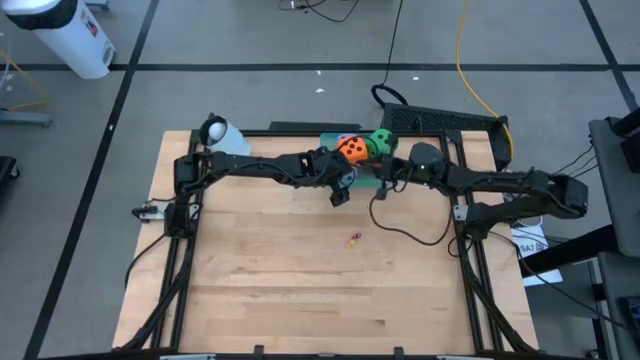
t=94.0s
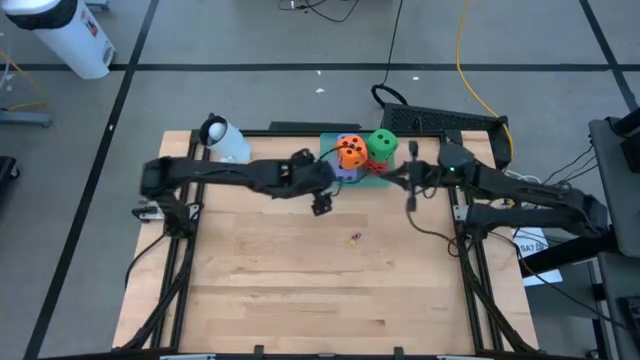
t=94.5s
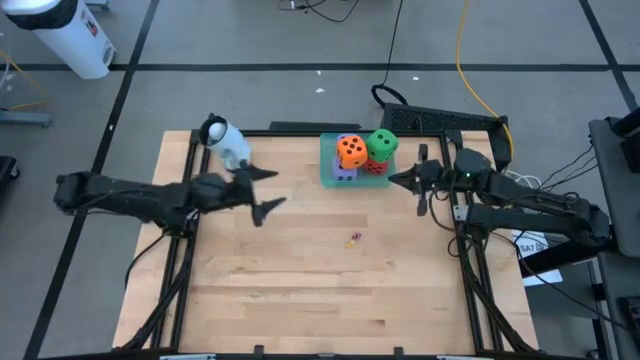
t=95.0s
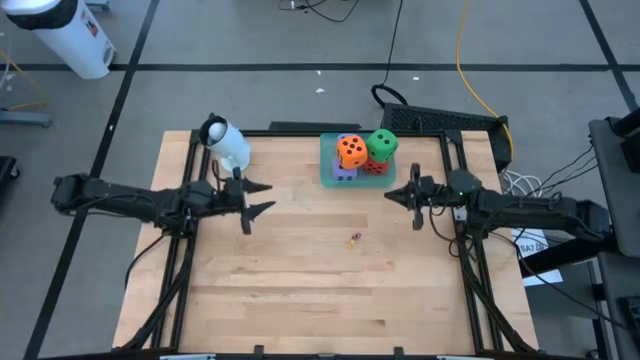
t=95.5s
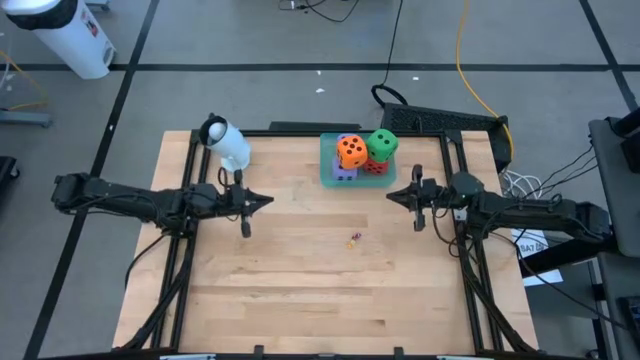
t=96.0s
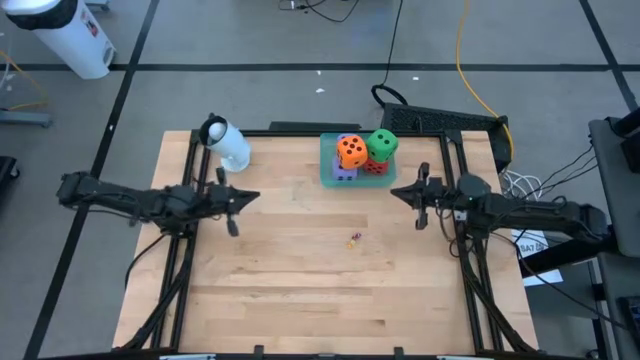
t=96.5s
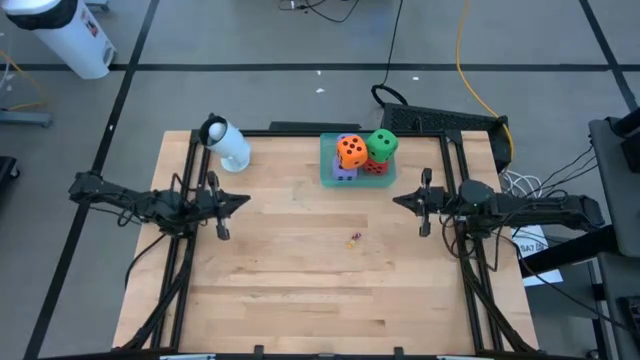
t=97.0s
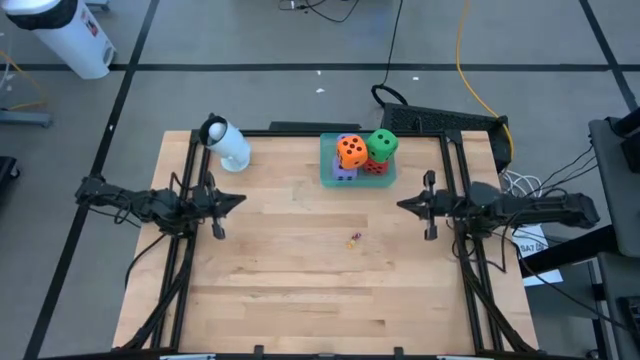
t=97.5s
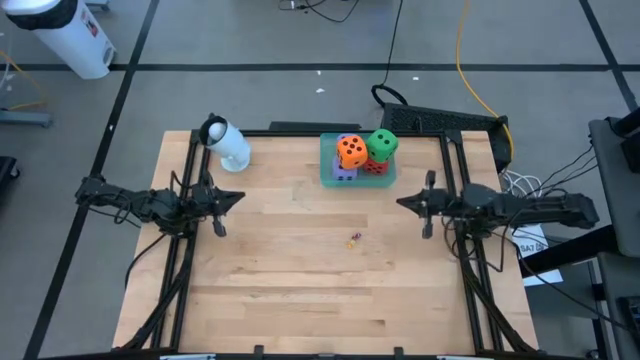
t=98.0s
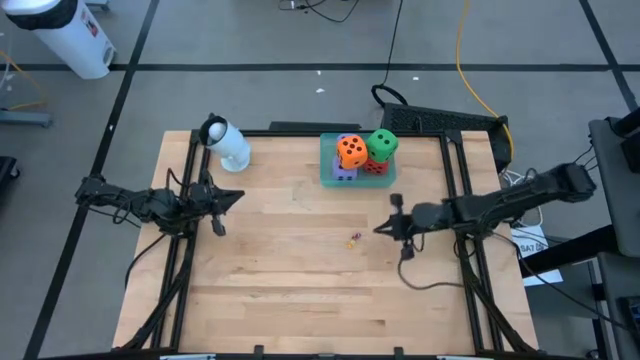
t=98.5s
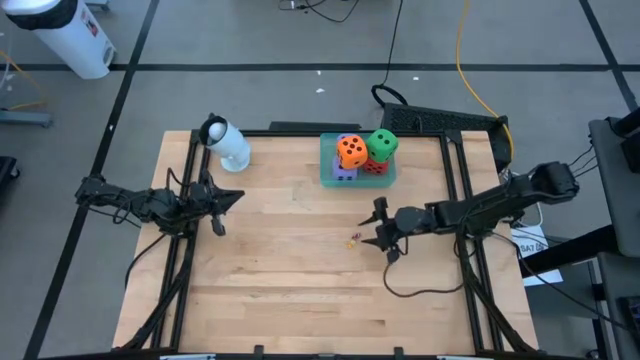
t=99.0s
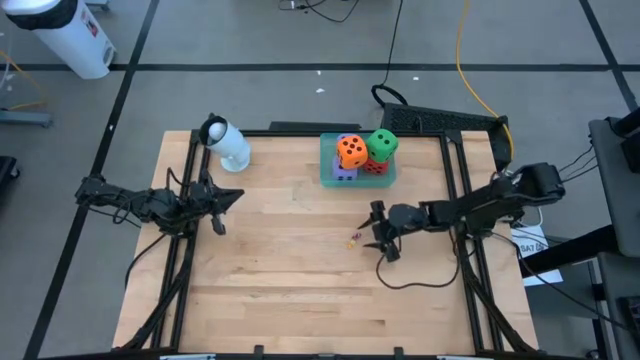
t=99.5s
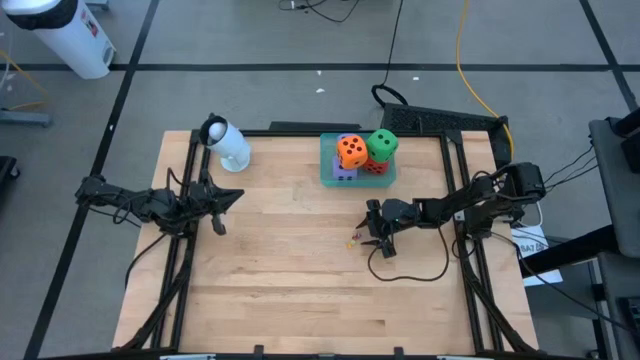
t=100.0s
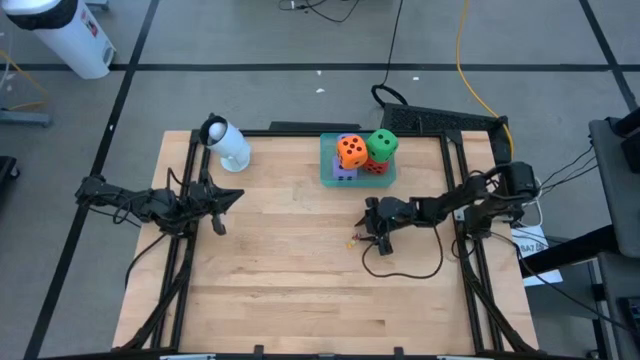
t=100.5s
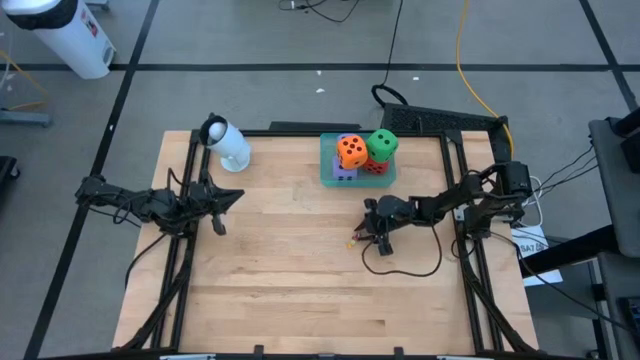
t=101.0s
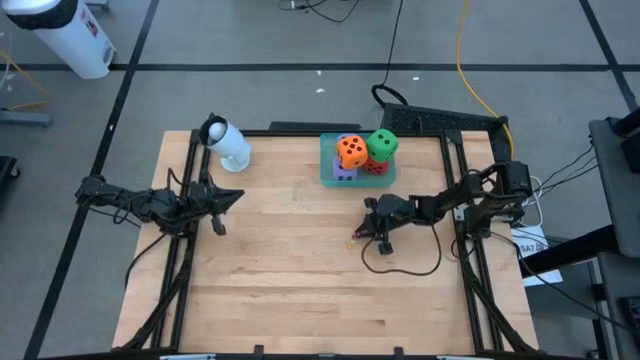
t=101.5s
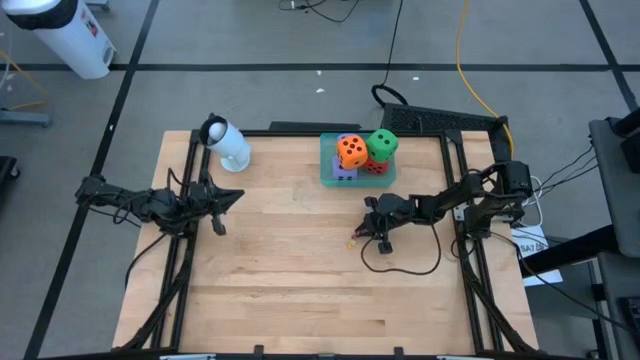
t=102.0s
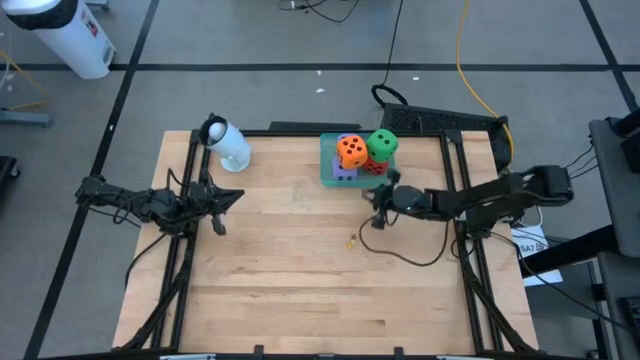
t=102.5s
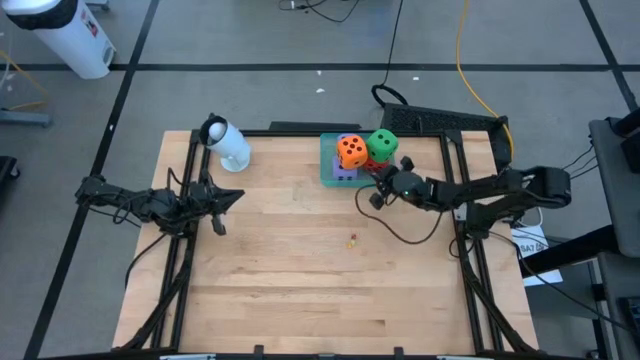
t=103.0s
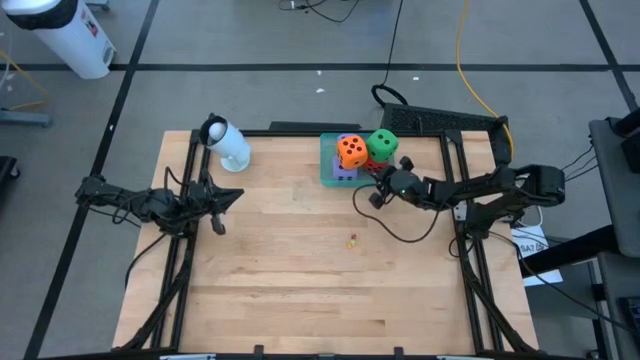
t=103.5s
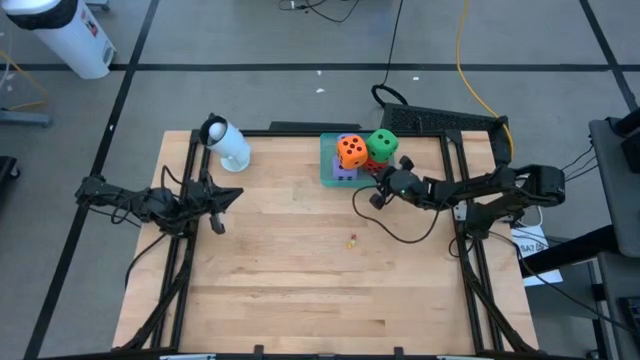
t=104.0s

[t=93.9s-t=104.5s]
Task: Pick & Place Dice
Put the small violet die into the bin

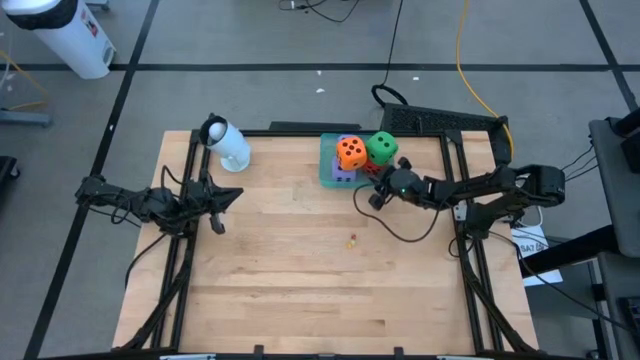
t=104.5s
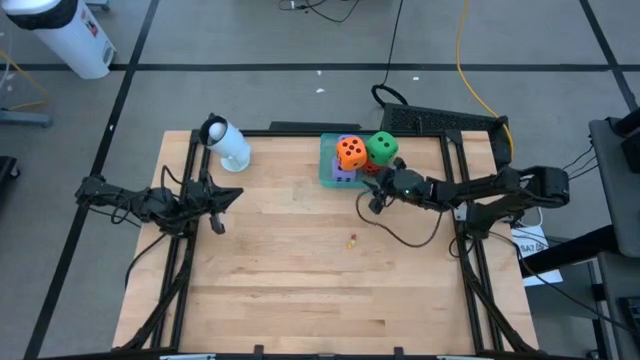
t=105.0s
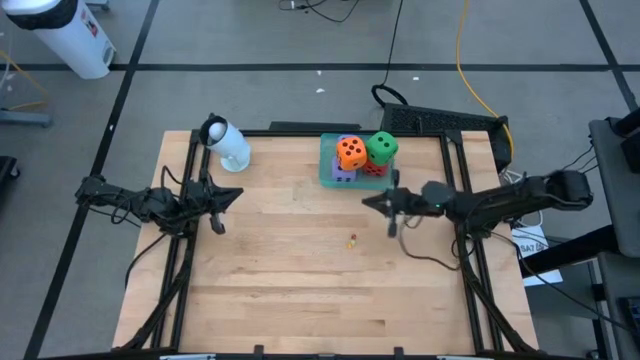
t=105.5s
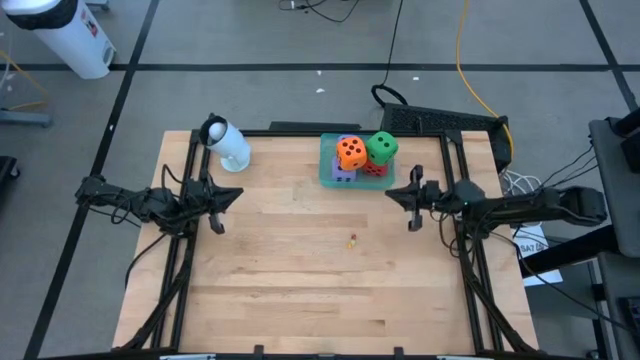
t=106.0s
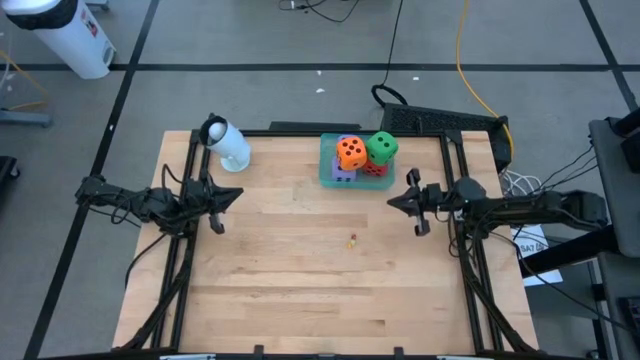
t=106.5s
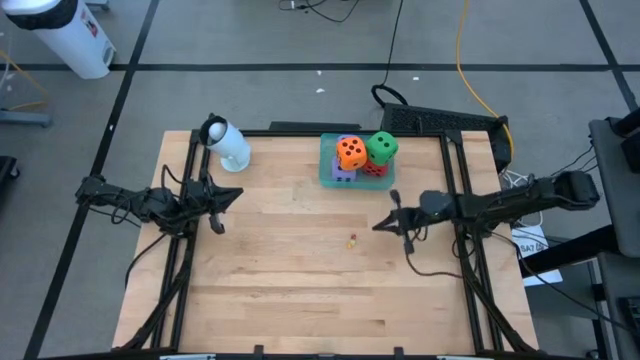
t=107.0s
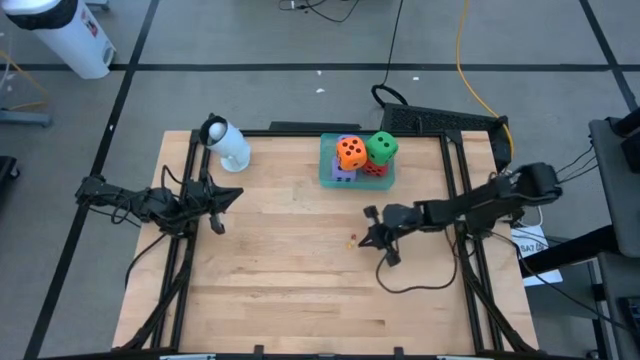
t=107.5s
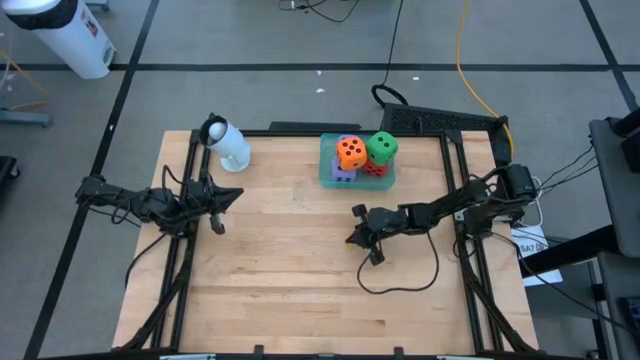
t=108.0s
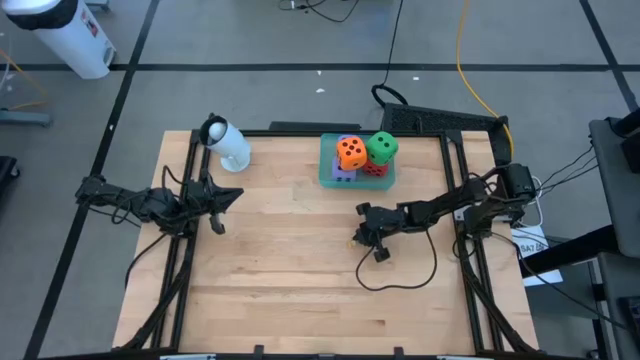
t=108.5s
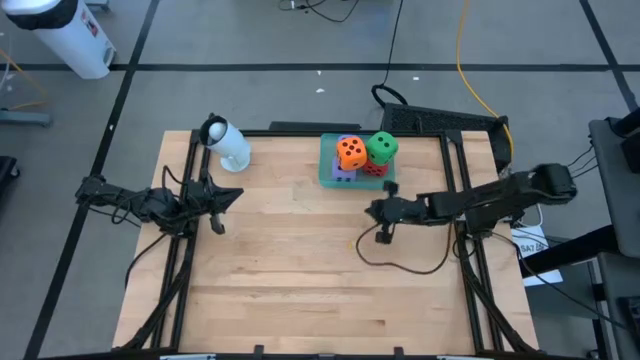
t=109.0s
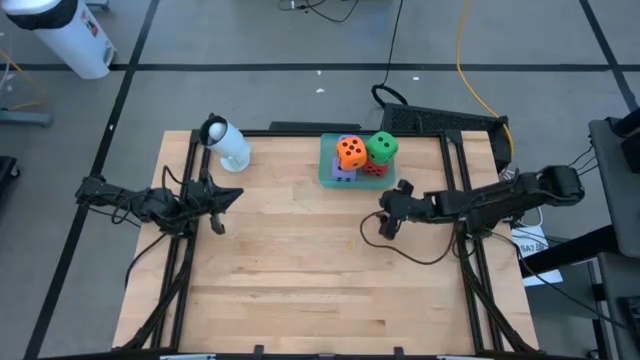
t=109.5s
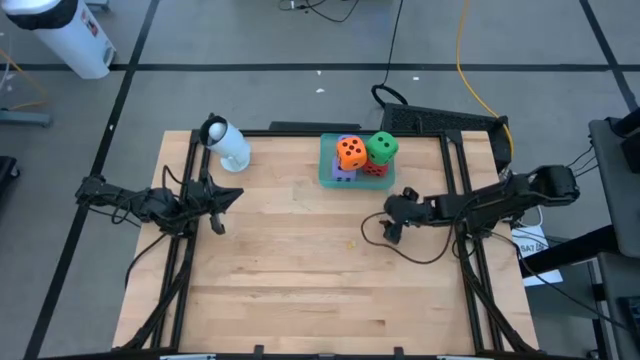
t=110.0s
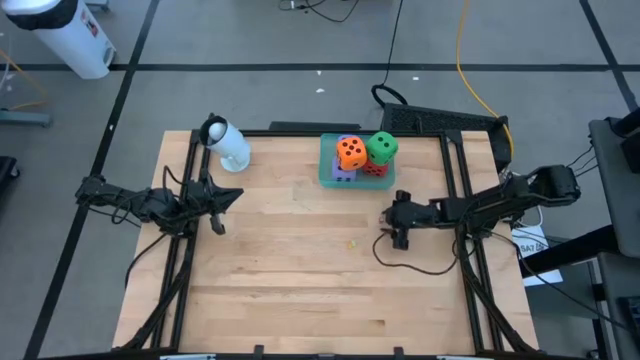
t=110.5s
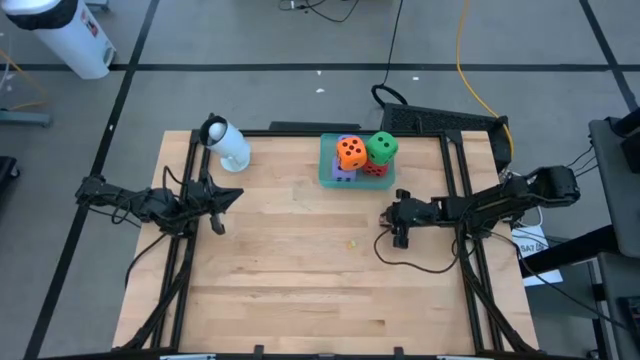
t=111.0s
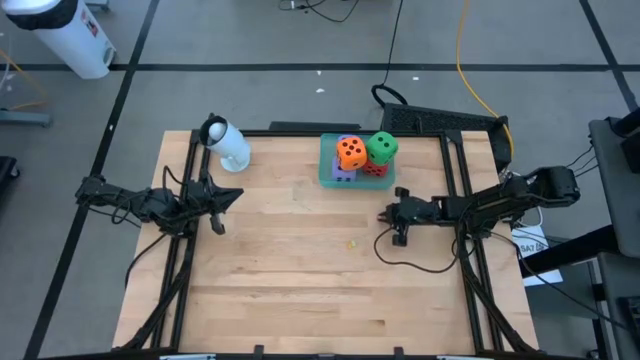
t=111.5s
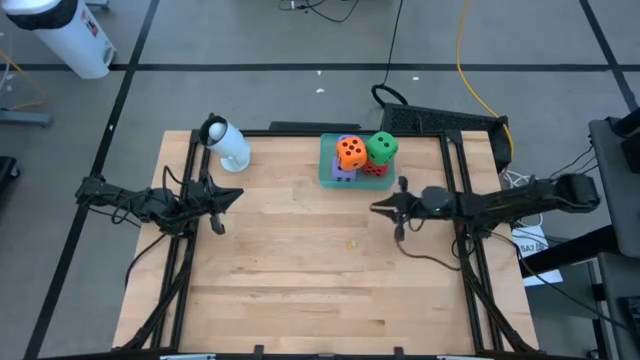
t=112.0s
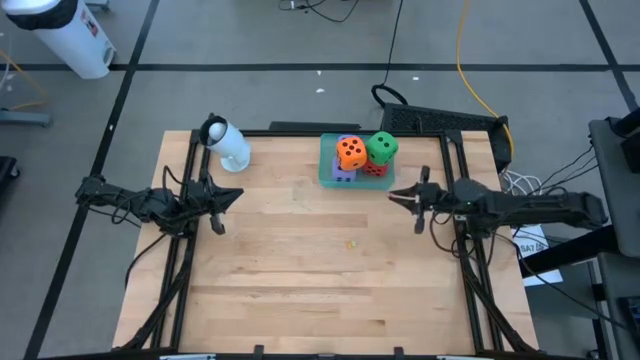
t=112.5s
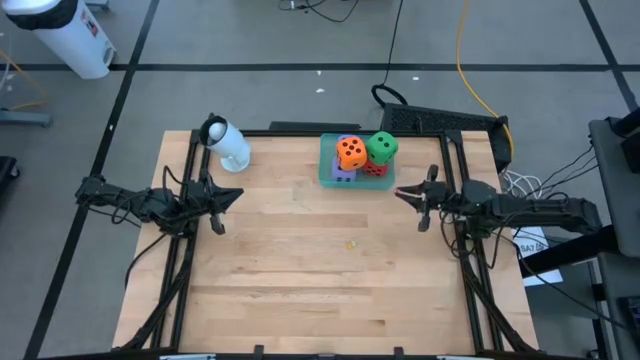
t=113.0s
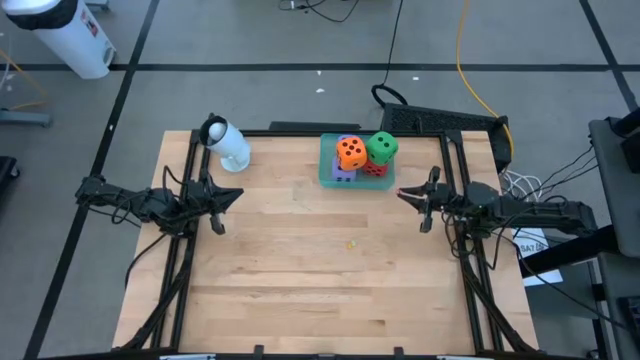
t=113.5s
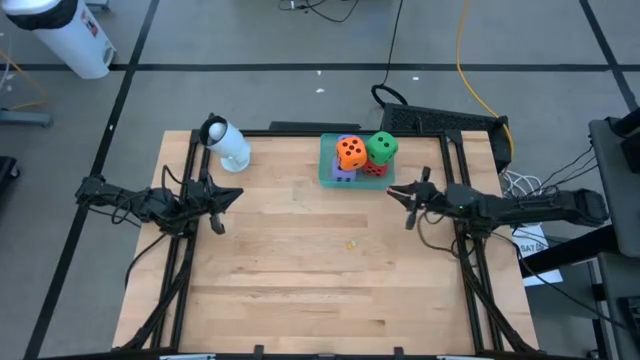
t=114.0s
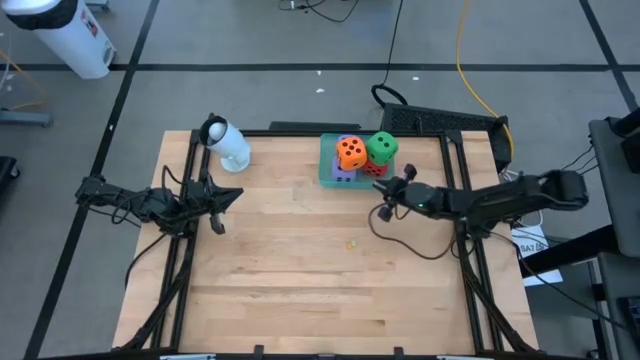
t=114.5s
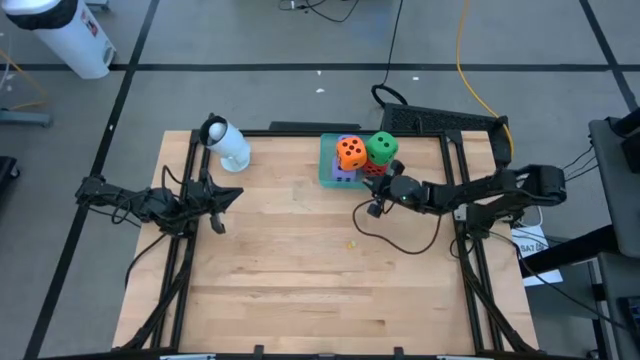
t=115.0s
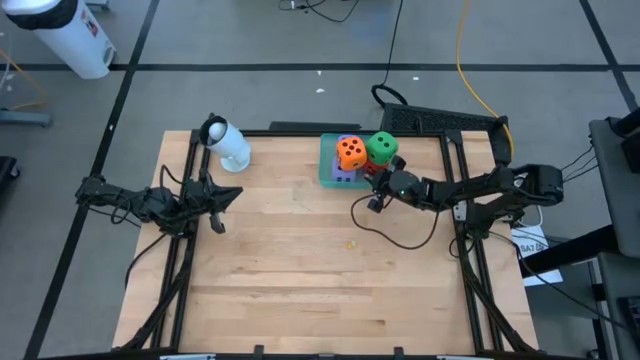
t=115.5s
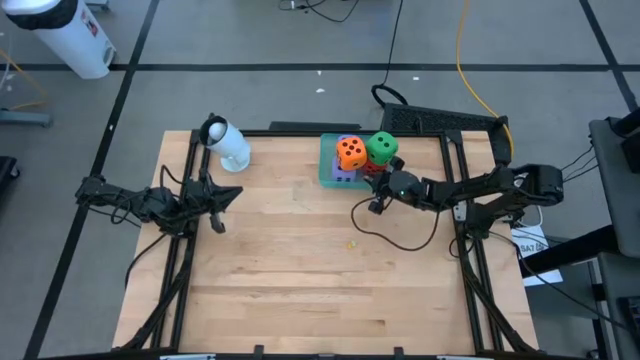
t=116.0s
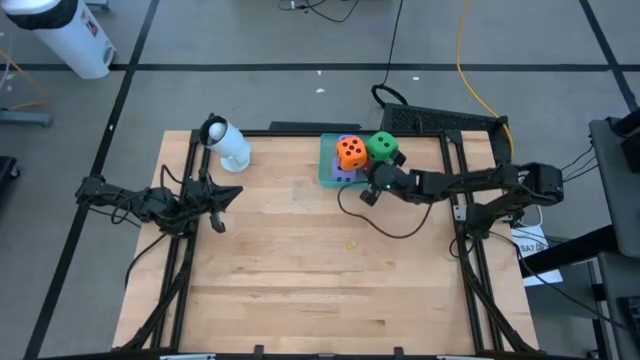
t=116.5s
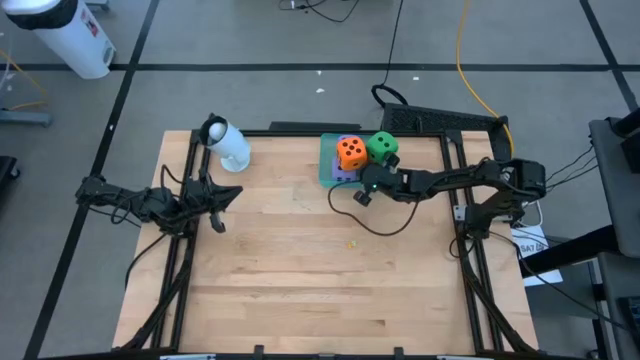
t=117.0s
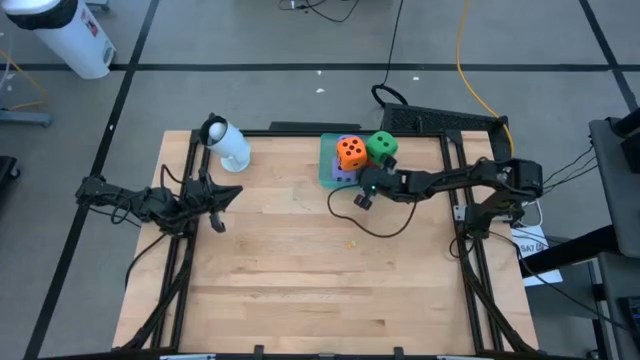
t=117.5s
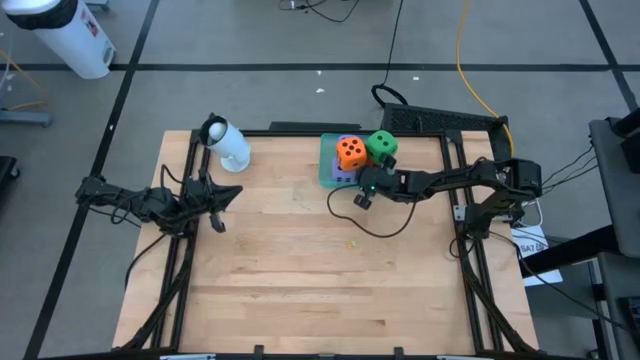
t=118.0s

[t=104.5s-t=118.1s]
Put the small red die into the bin
